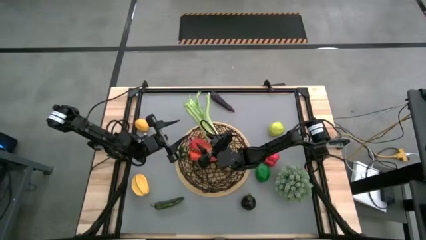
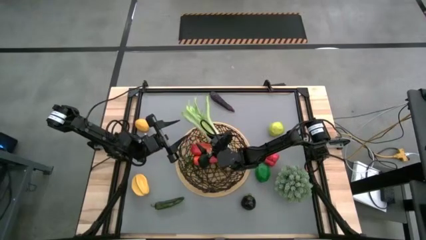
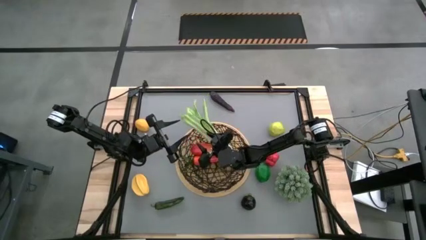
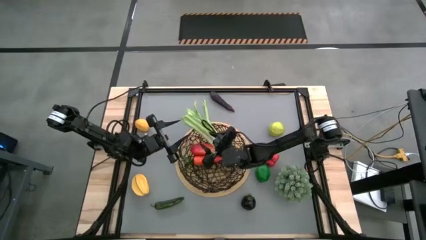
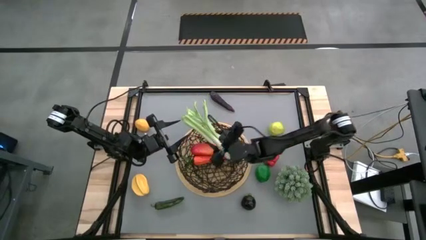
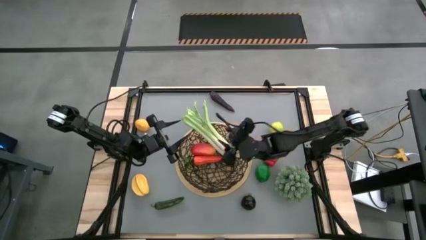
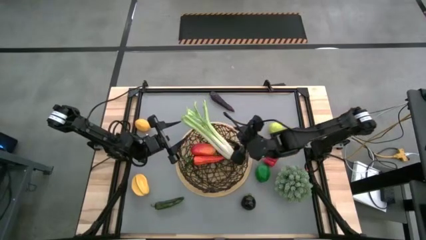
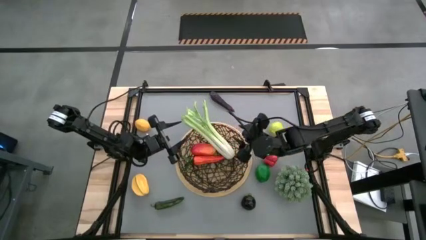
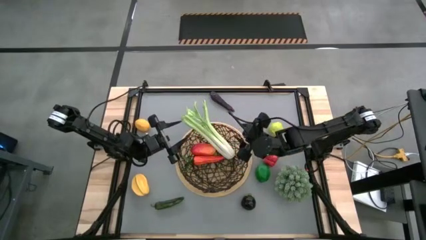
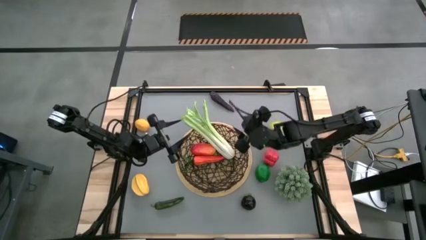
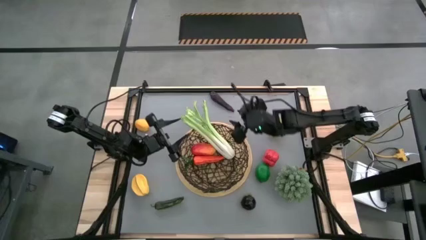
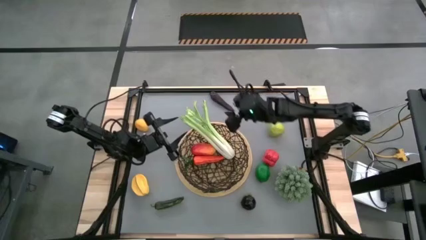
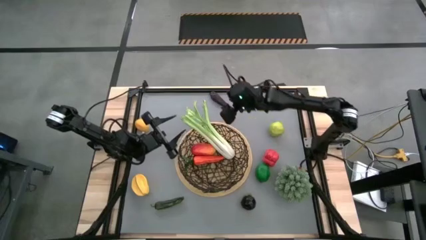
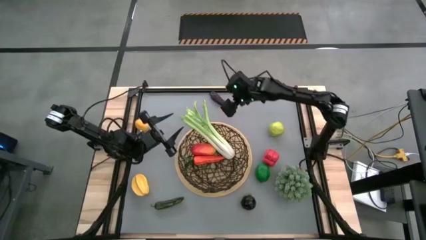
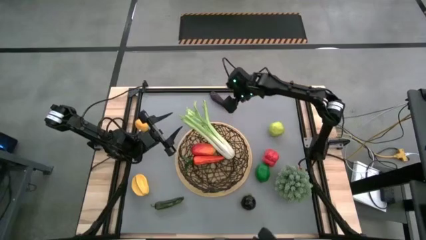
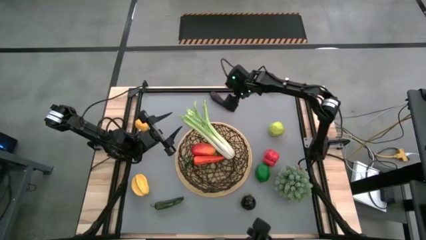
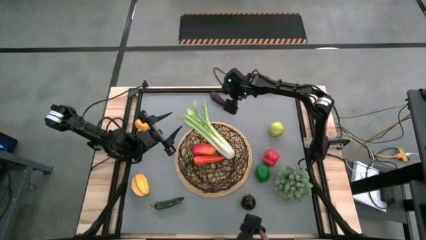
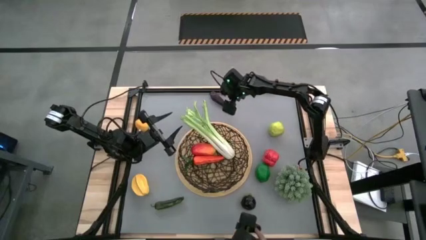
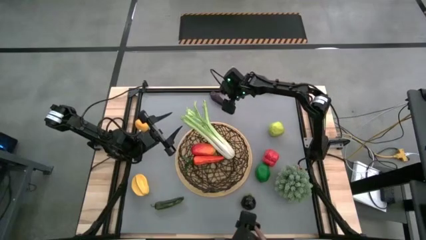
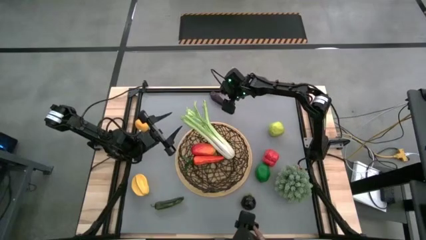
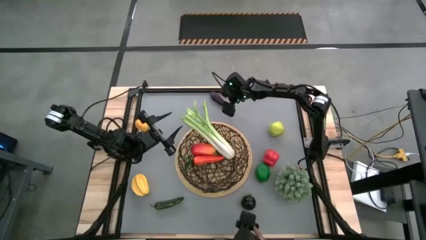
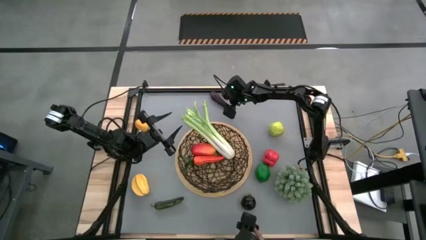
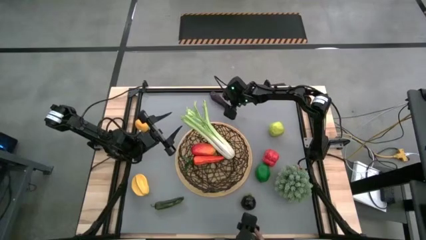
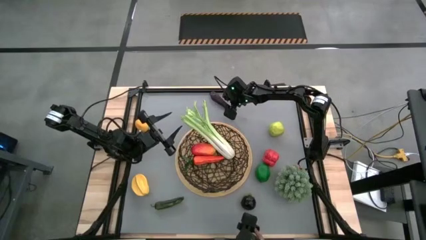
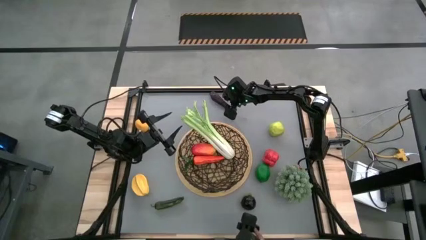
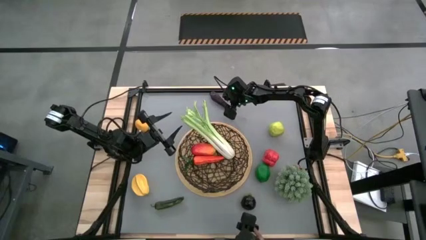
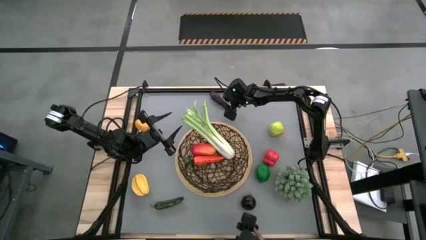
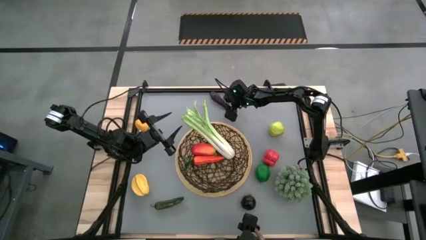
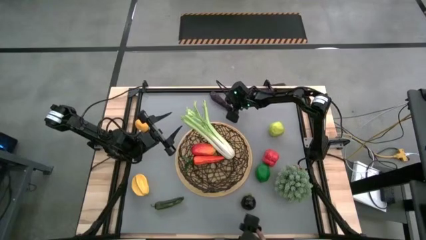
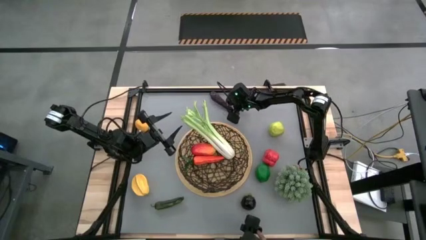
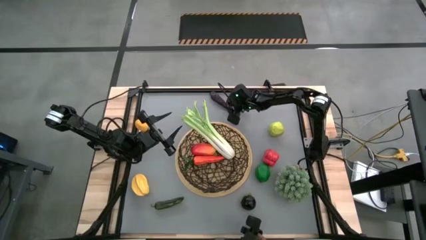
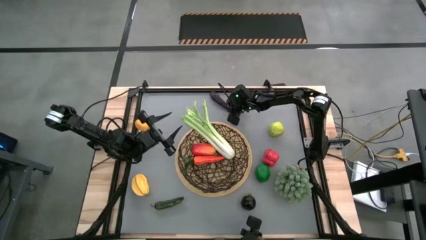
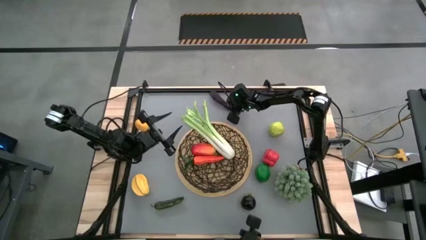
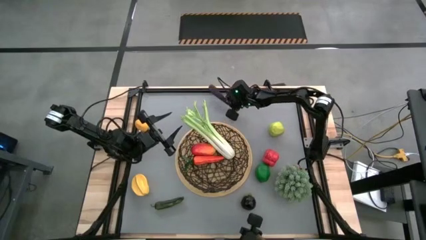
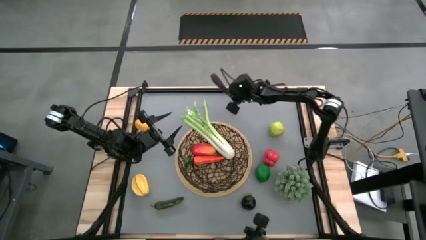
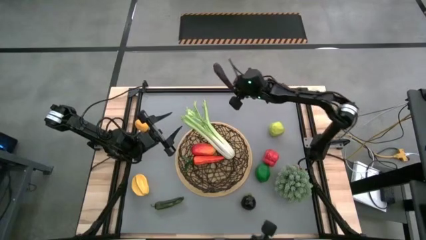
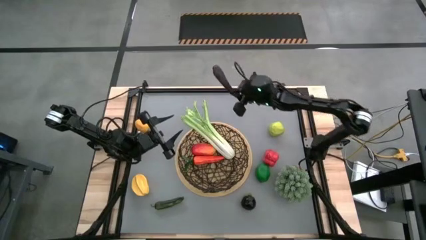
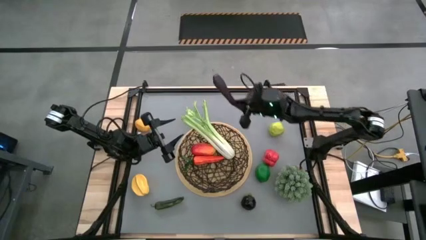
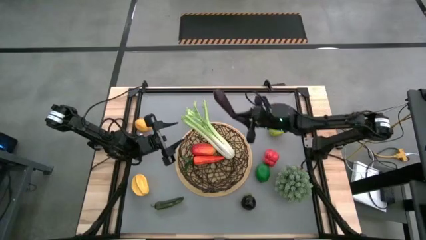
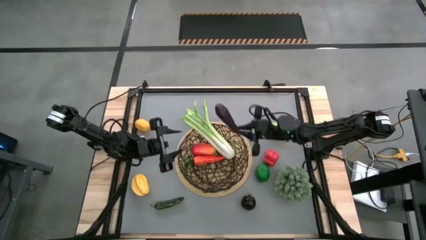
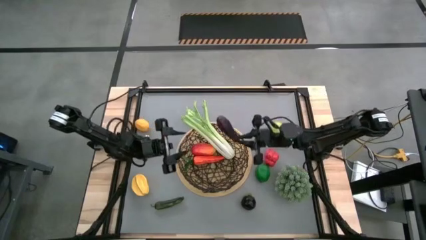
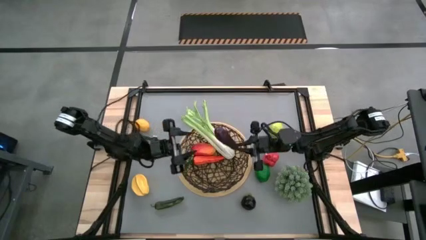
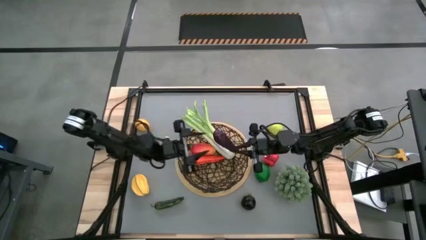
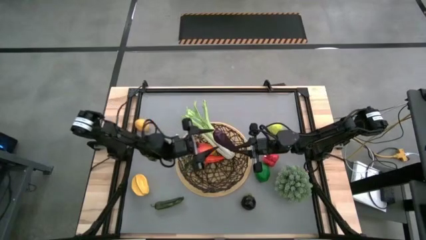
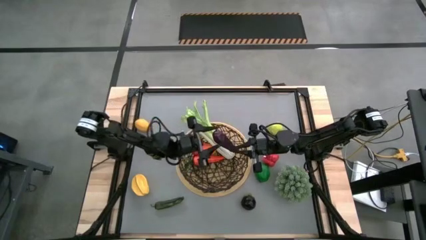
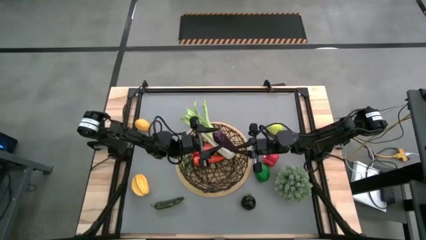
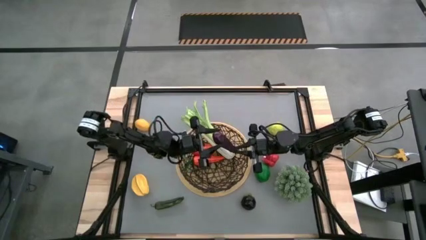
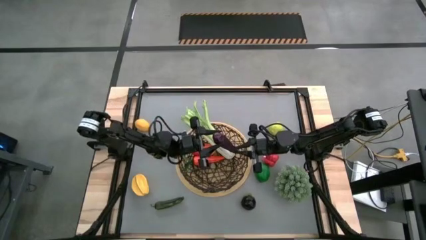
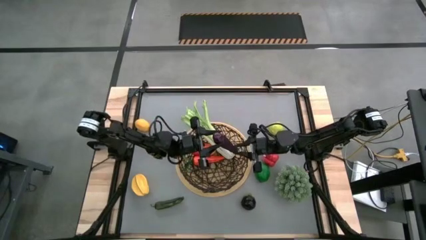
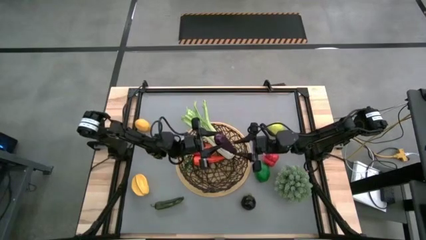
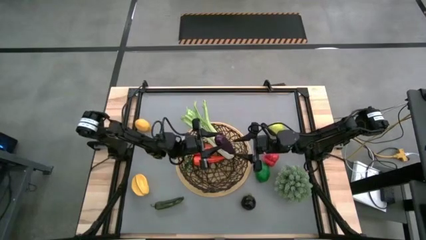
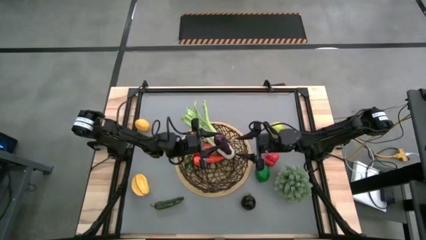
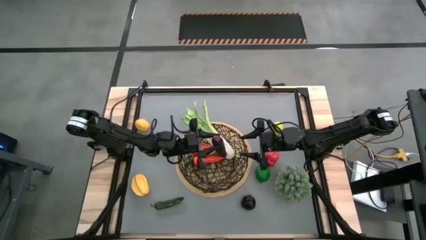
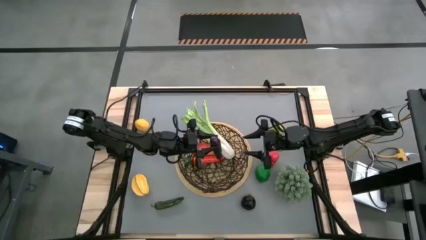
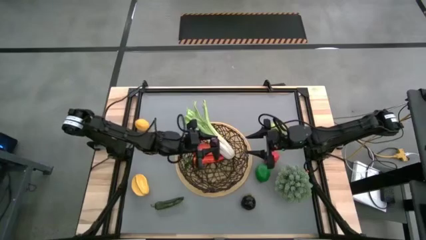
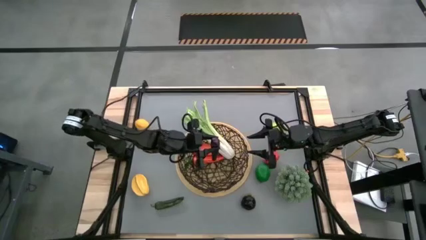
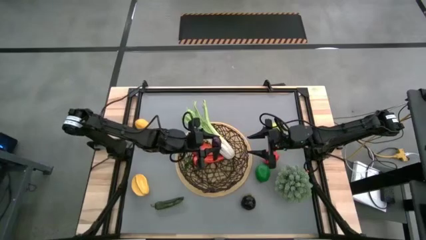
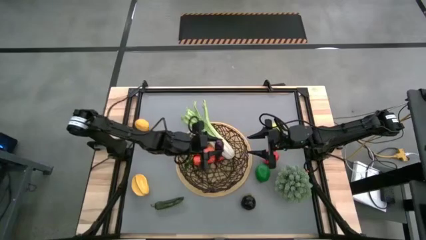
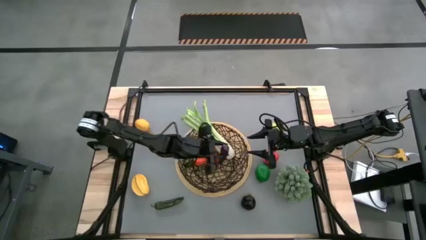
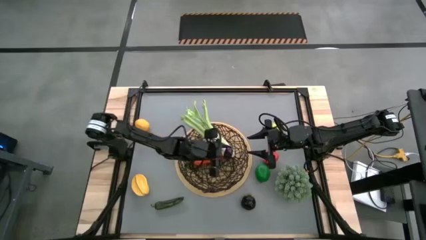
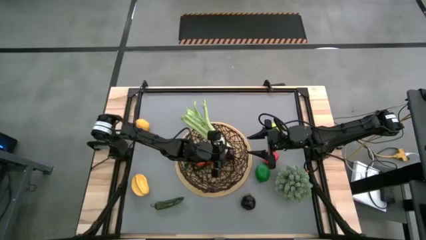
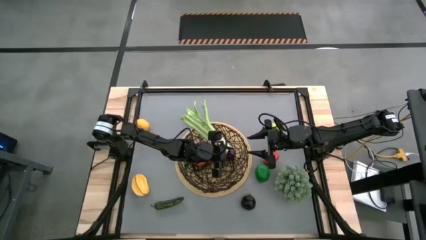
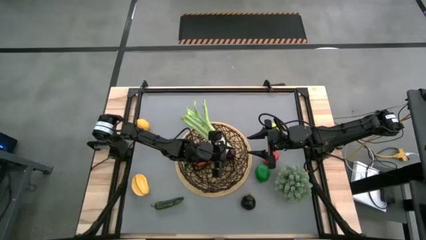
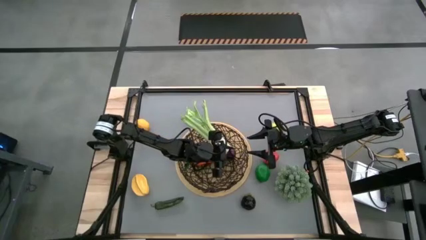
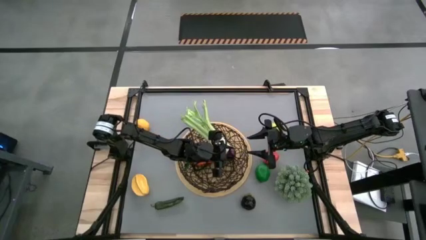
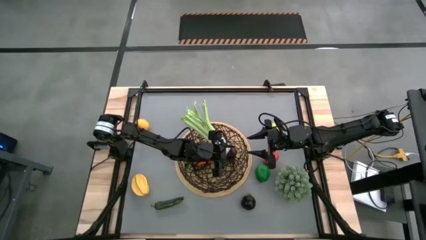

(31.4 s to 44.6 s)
Task: Build produce basket
Put the eggplant into the wire basket

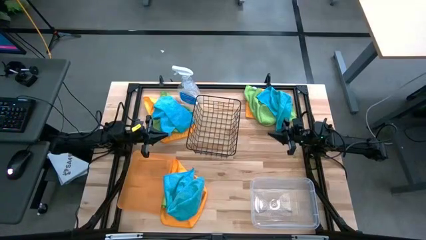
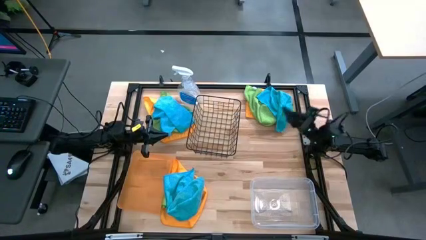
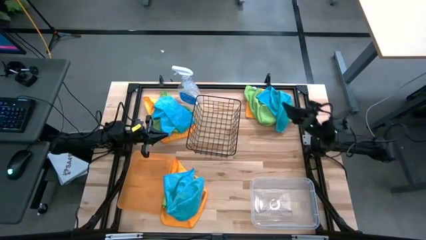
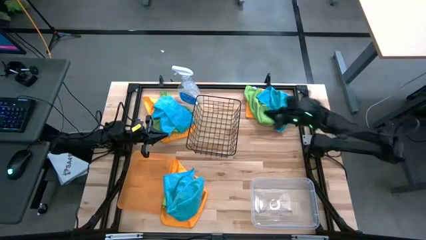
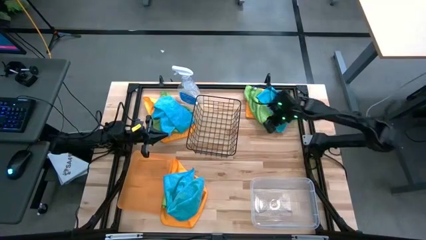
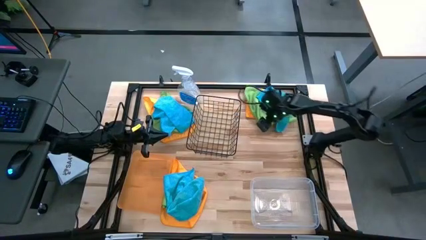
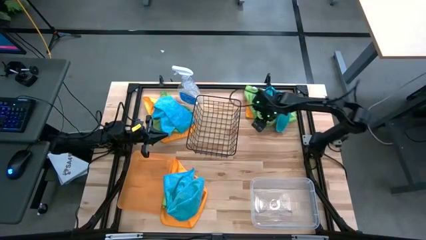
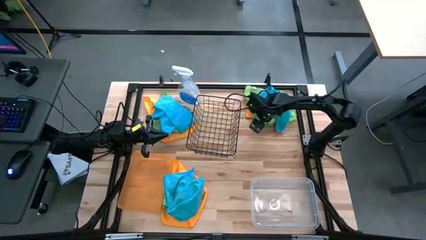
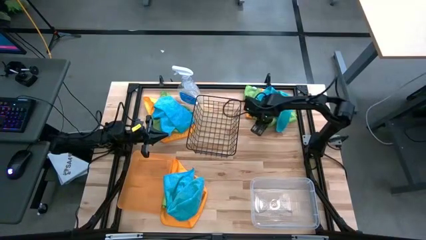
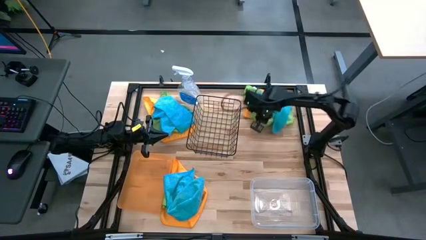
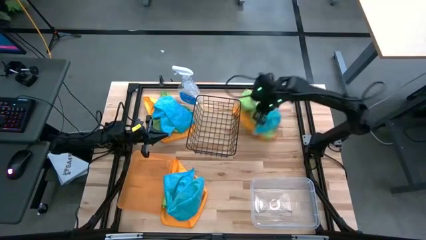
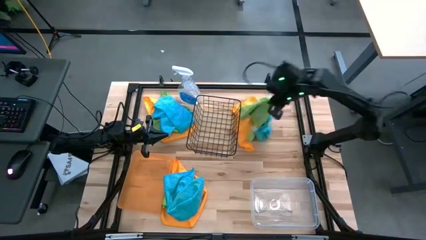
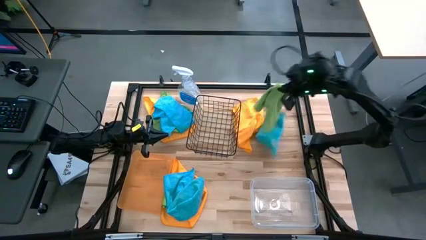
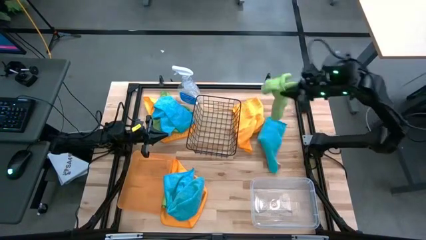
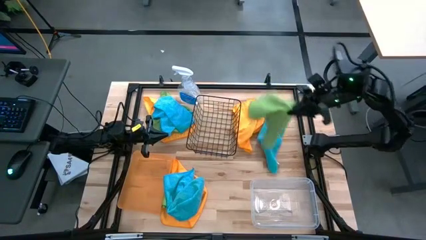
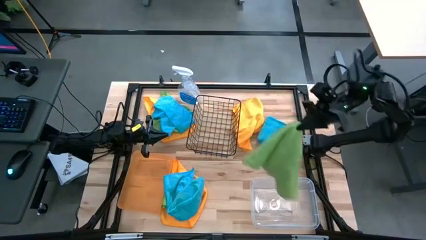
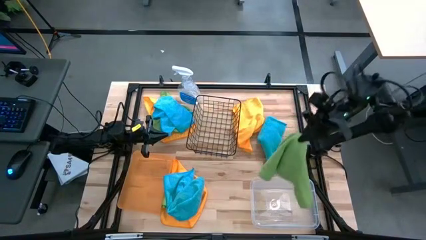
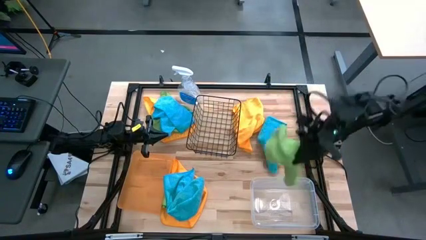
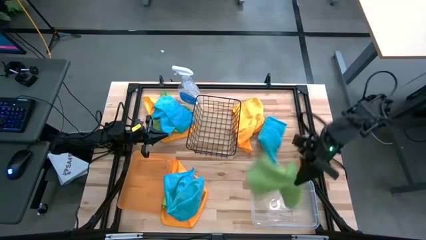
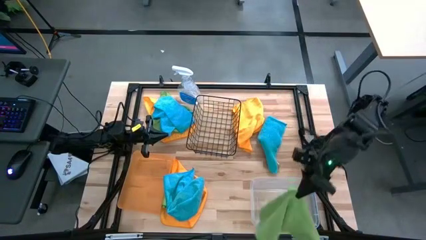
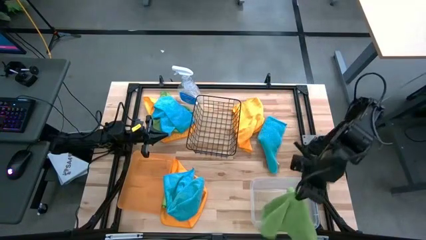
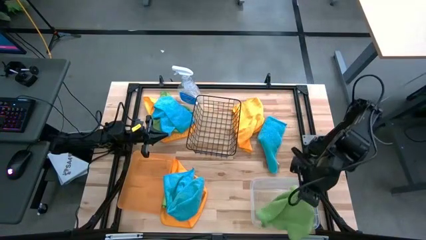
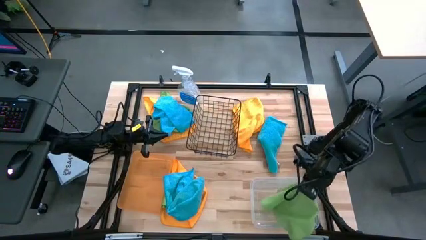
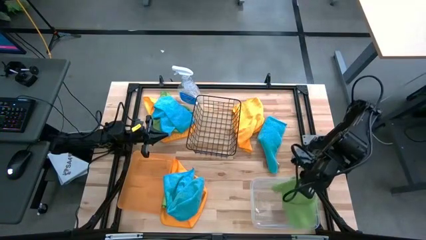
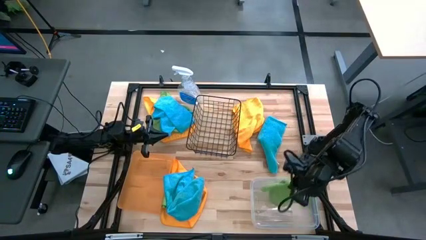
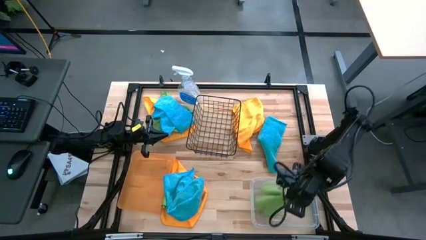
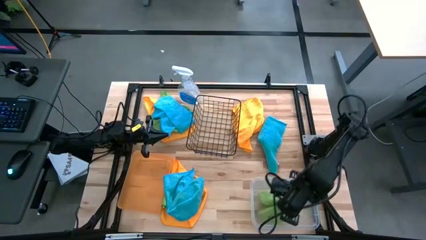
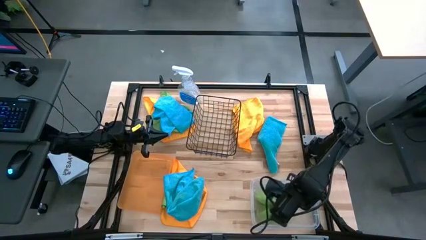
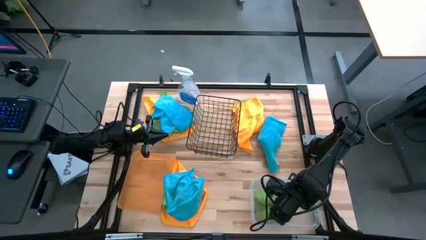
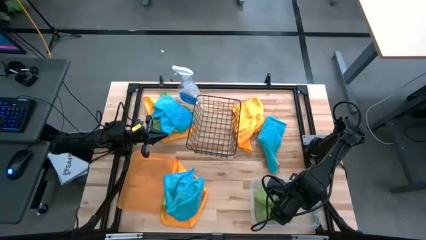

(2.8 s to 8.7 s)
Task: Sort microfiber towel by color & place in baskets
Put the top right green microfiber towel into the transparent bin
